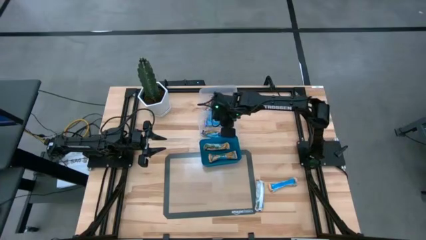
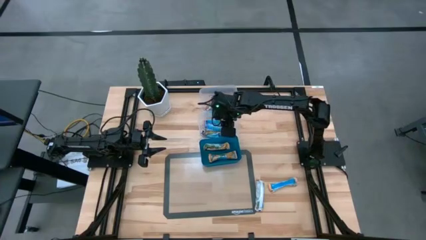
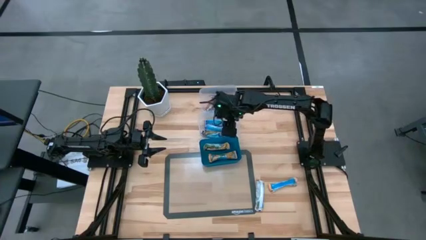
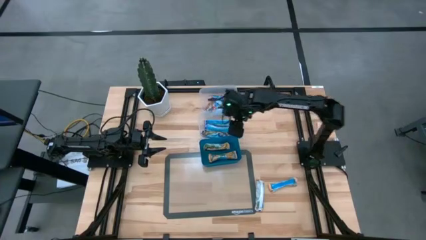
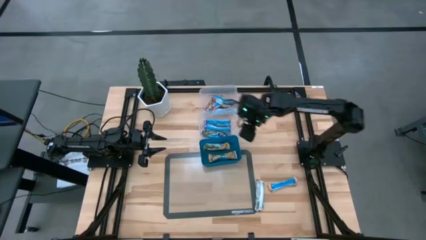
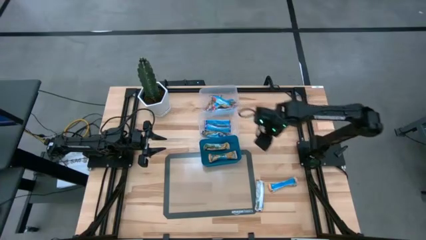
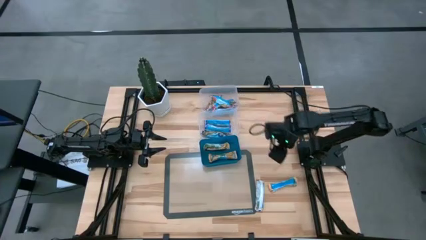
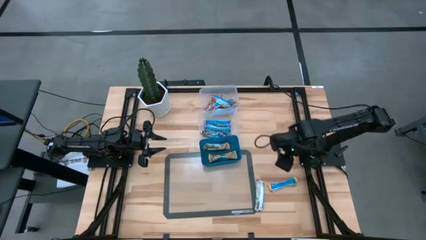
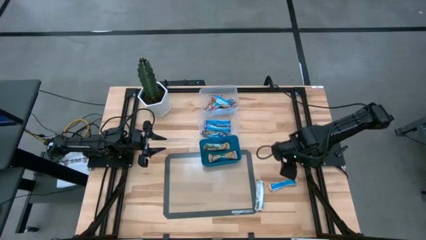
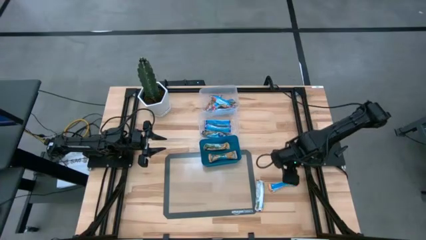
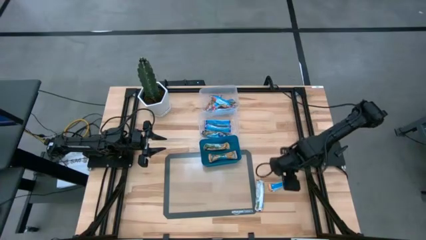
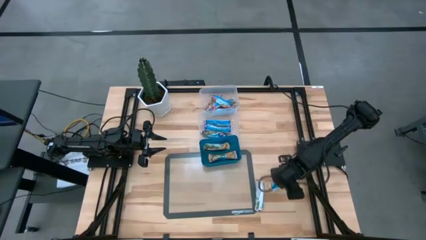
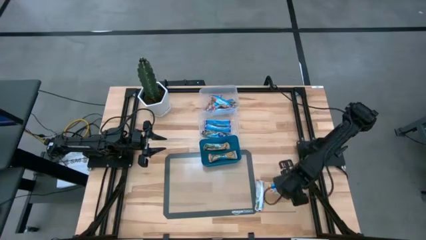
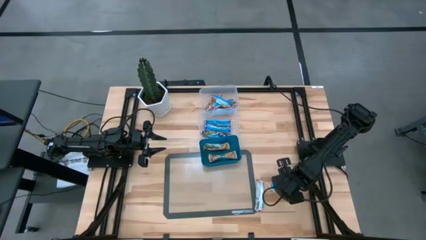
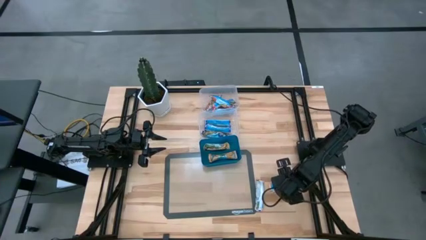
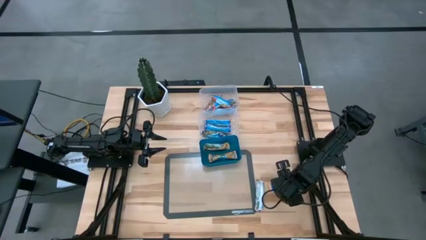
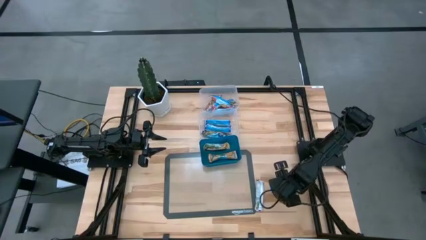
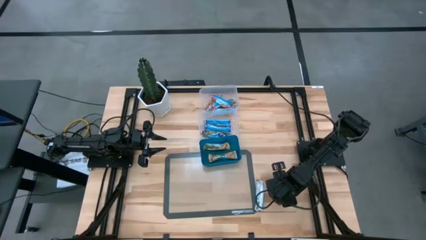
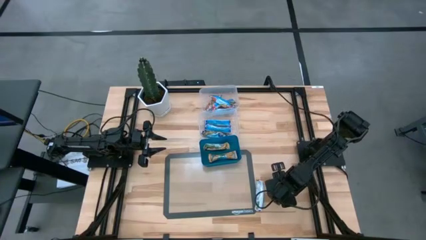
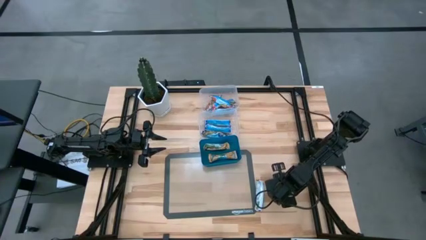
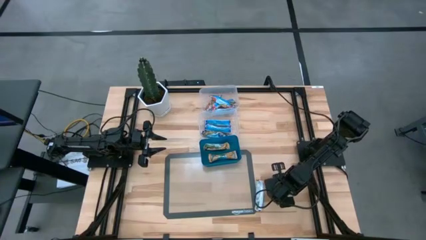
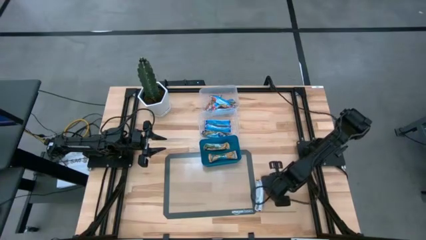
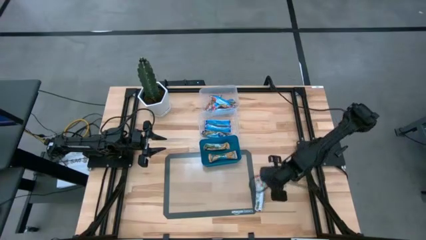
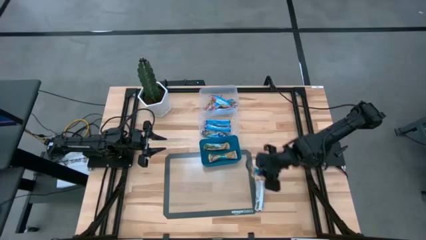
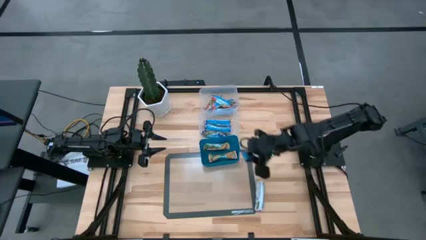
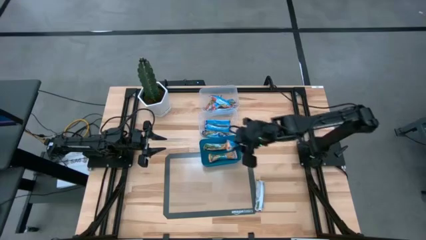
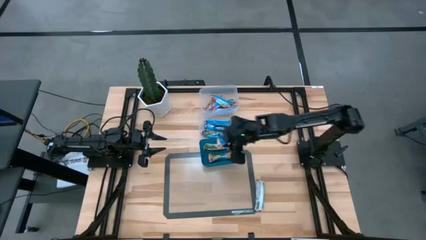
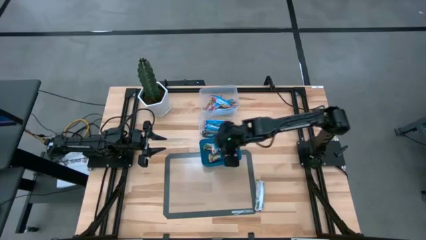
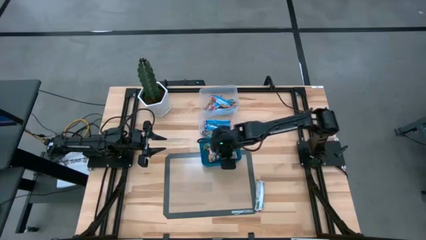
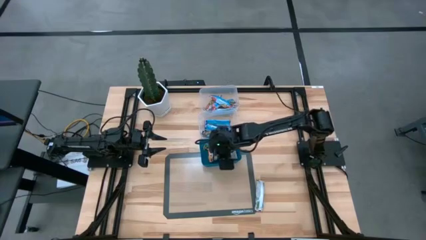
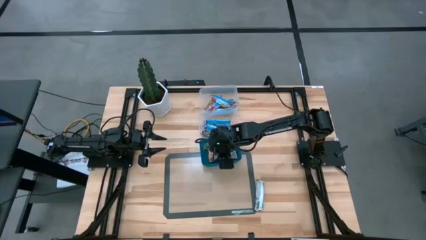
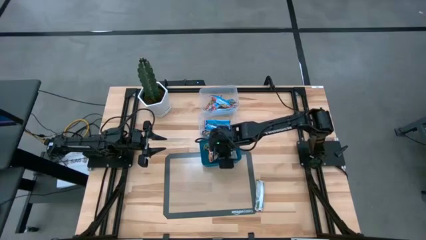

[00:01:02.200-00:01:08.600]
Task: Pick and place Granola Bars by type
Put the yellow granola bar into the top transparent bin

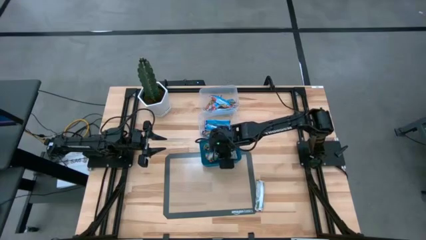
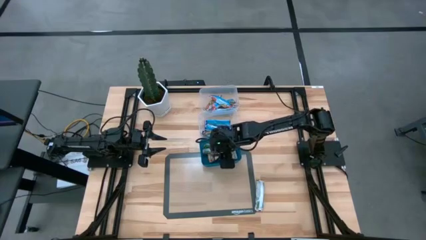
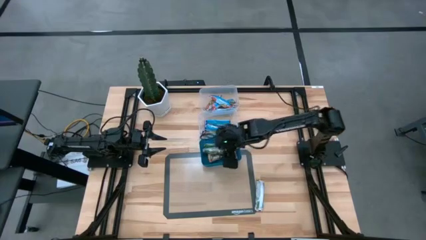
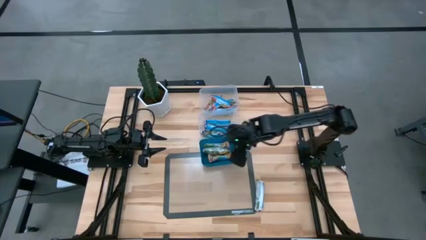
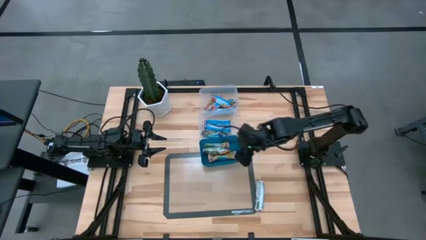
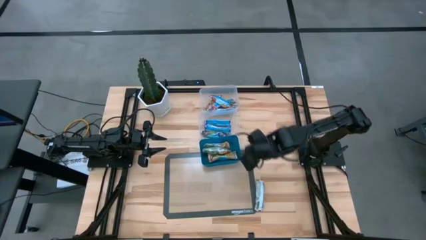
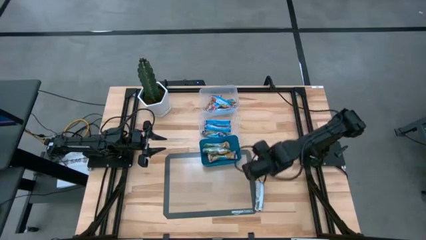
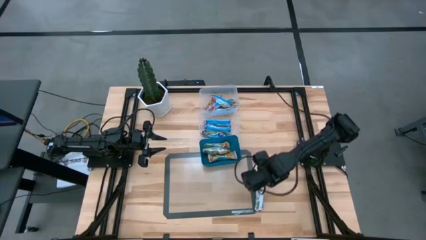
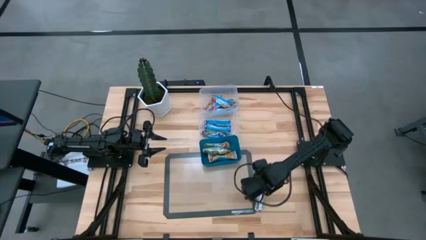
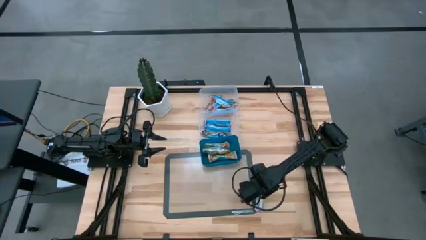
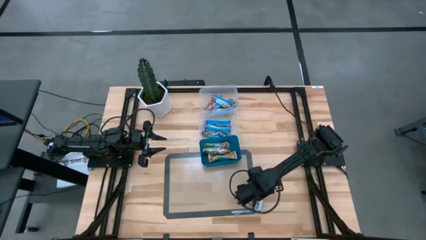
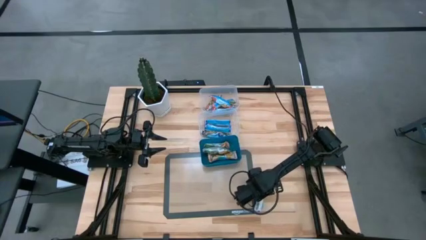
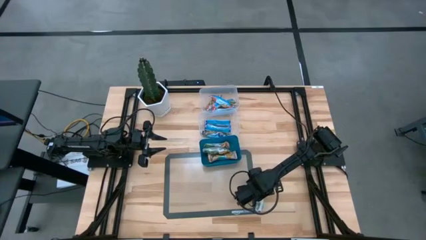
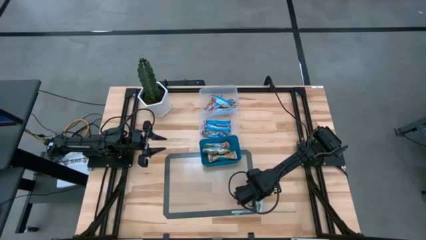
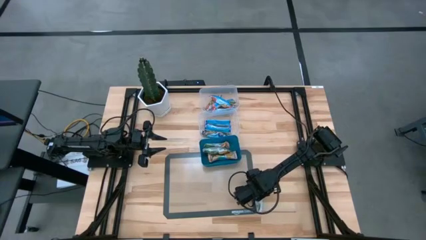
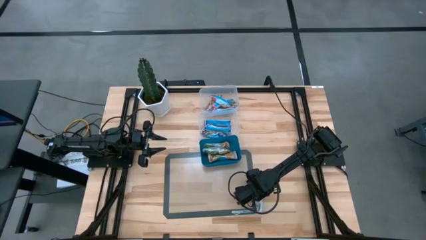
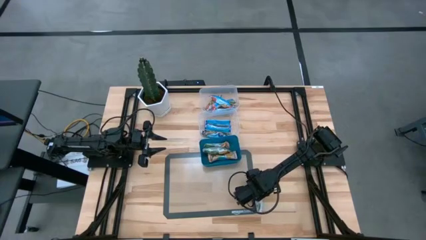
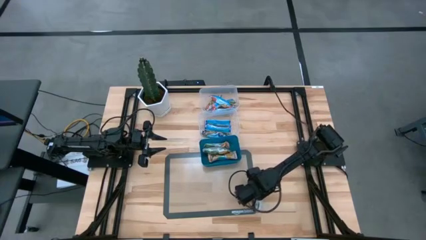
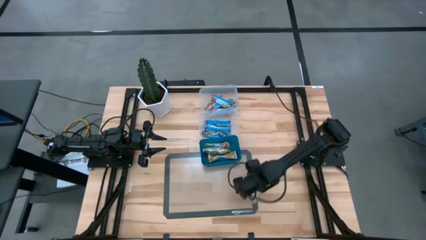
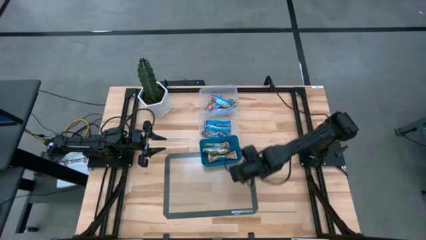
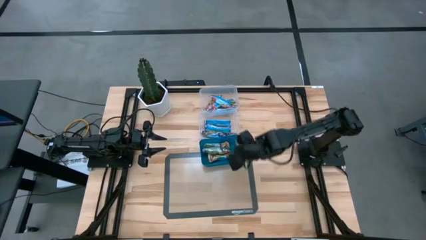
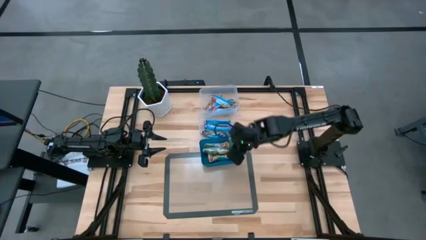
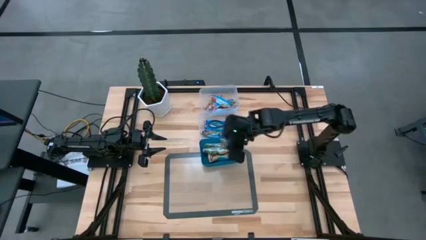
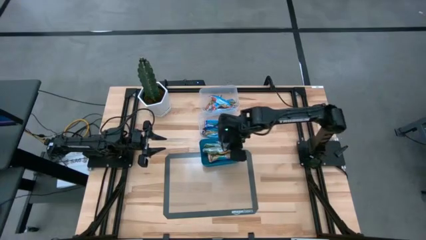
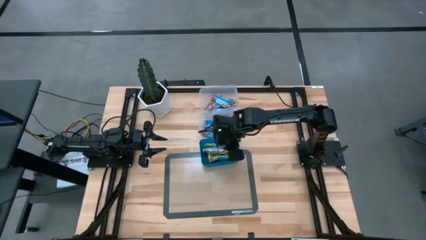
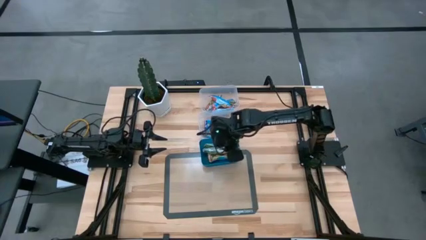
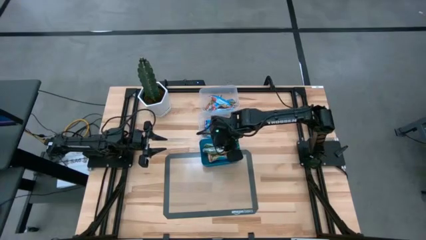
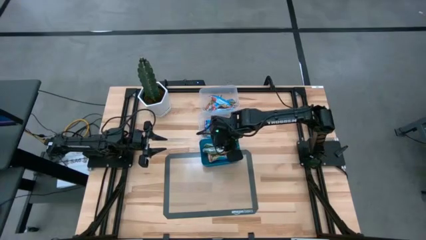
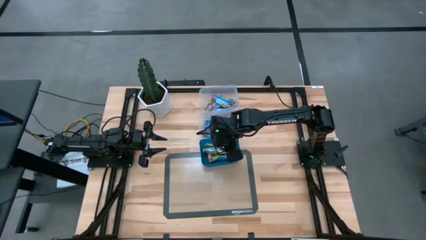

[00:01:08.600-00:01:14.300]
Put the yellow granola bar into the top transparent bin

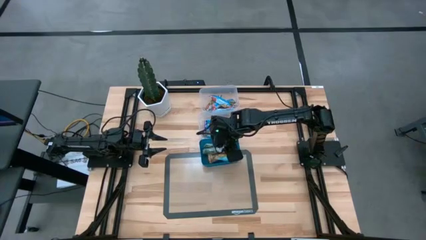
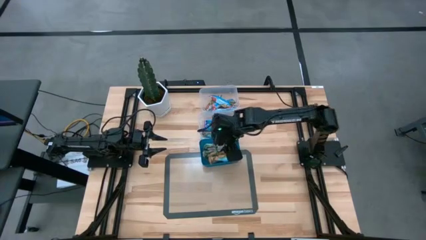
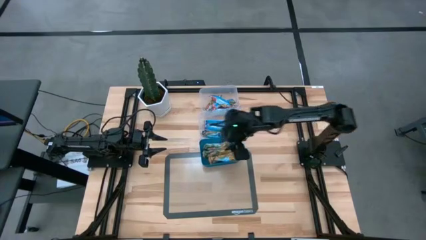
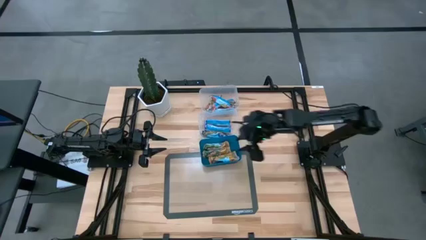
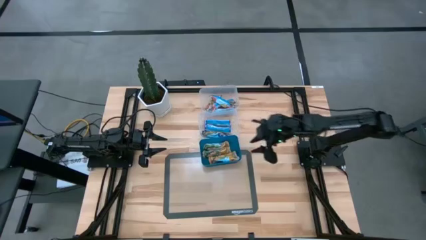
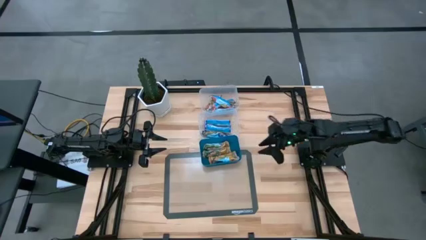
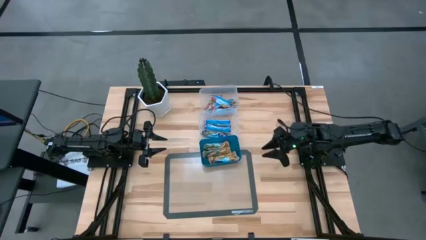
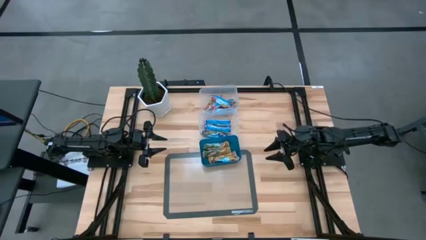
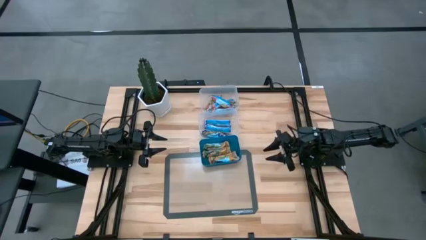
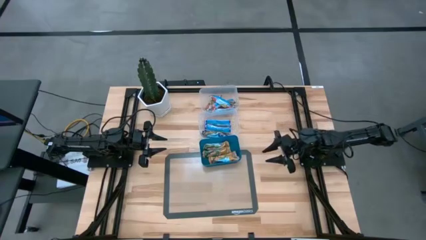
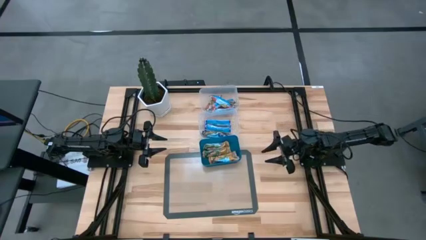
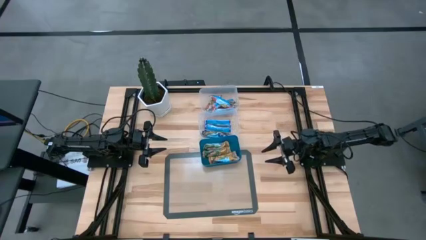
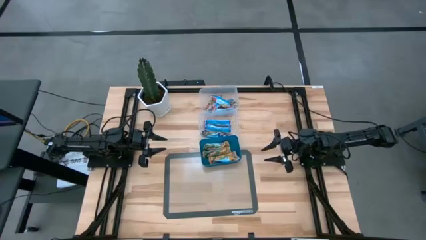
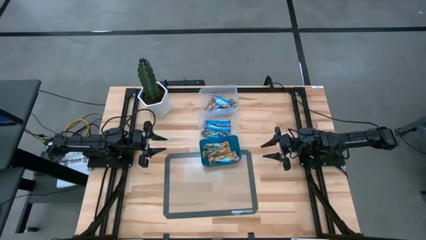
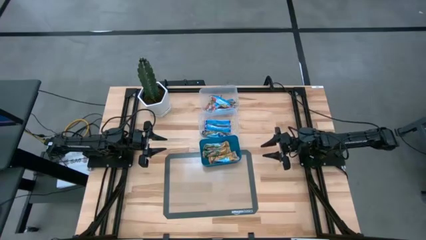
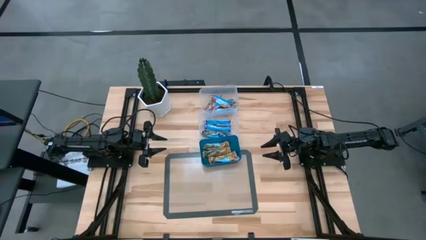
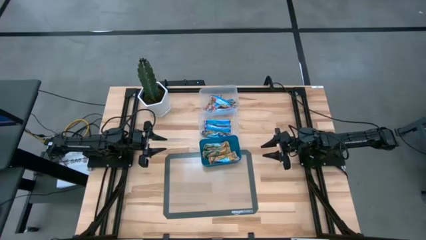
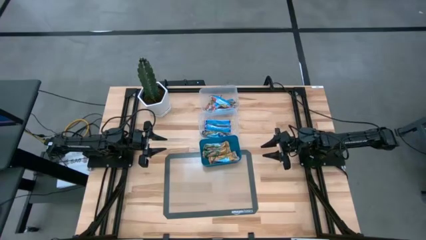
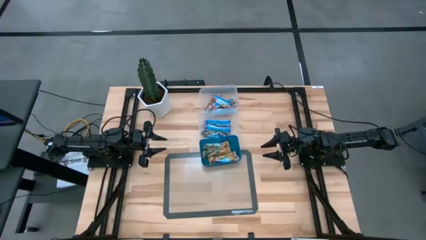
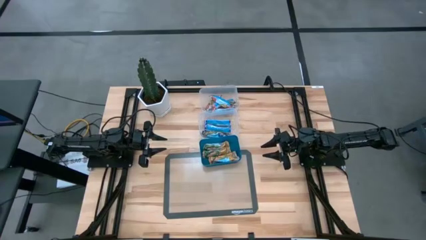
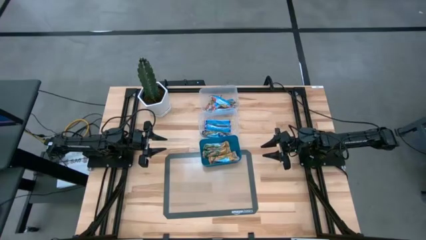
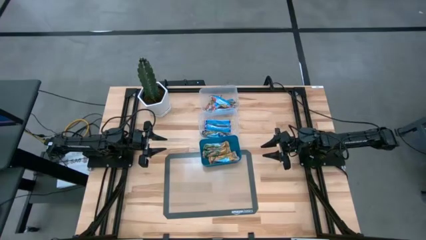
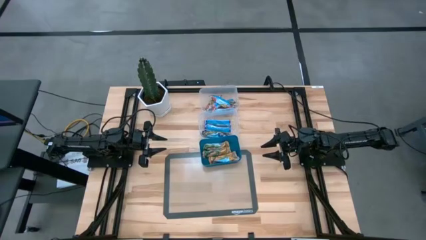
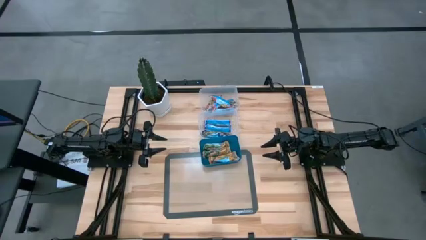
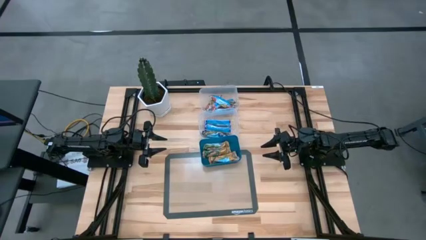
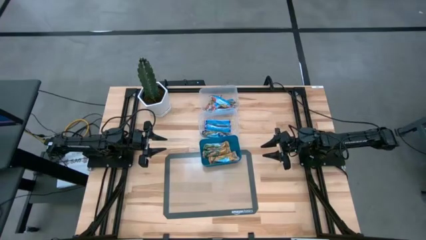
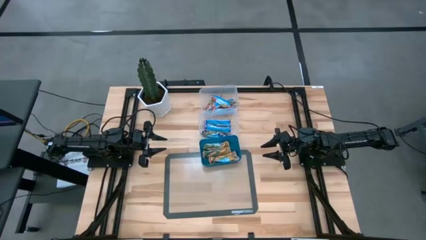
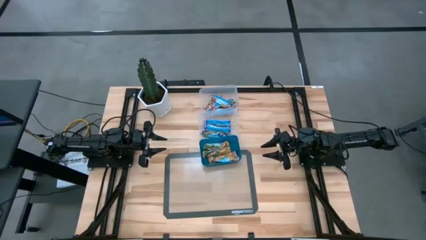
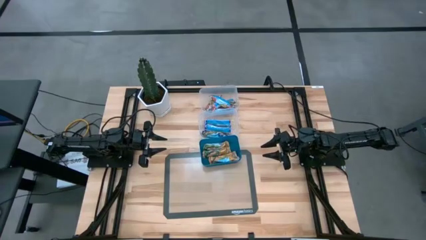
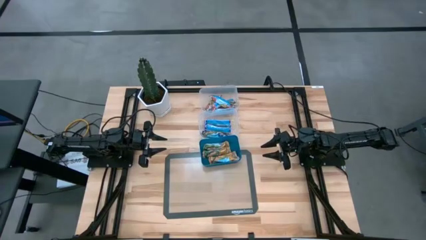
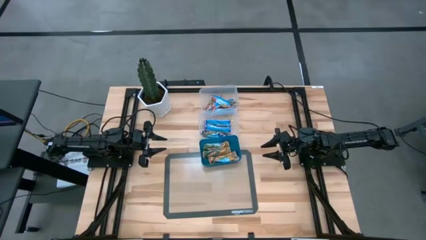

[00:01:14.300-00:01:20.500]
Return to Home Position
